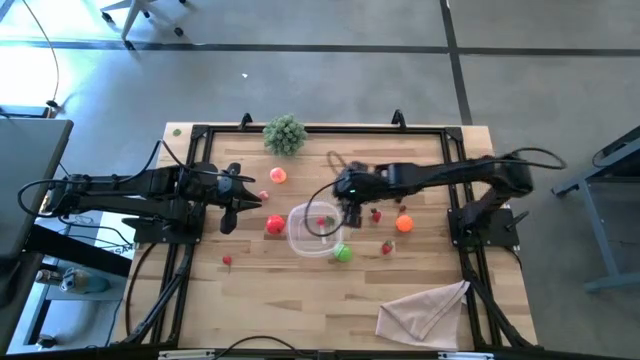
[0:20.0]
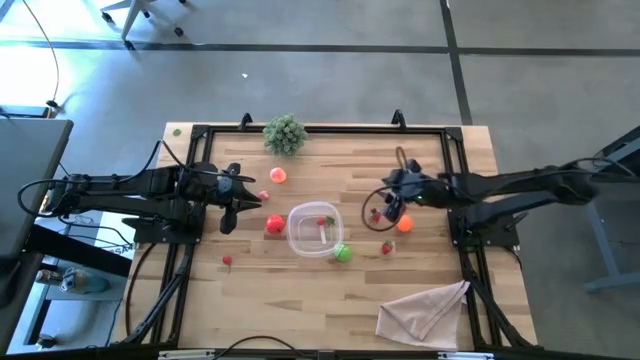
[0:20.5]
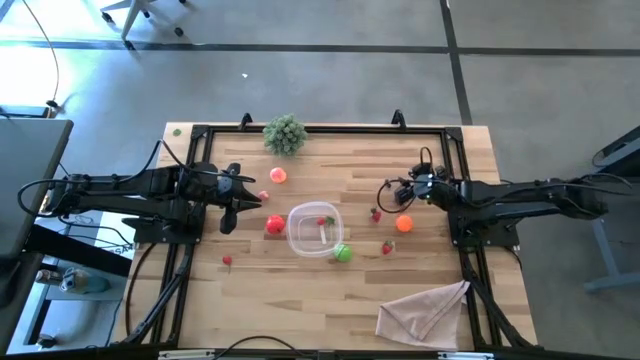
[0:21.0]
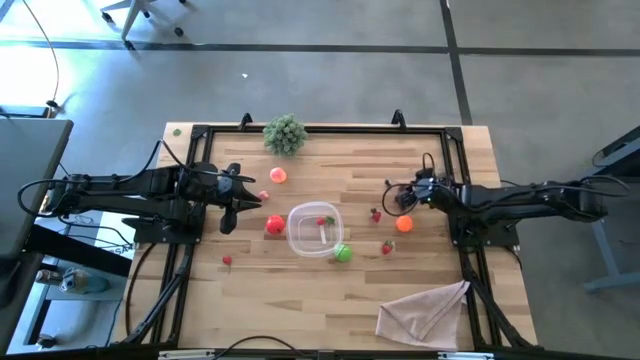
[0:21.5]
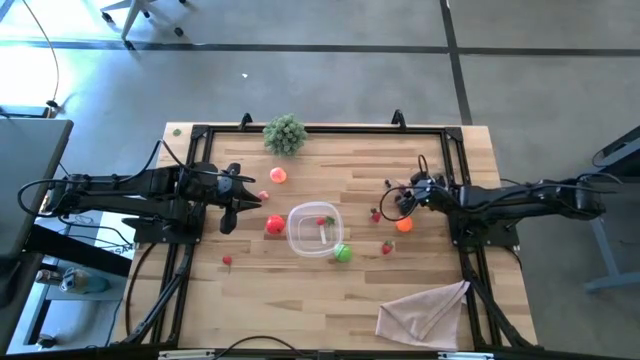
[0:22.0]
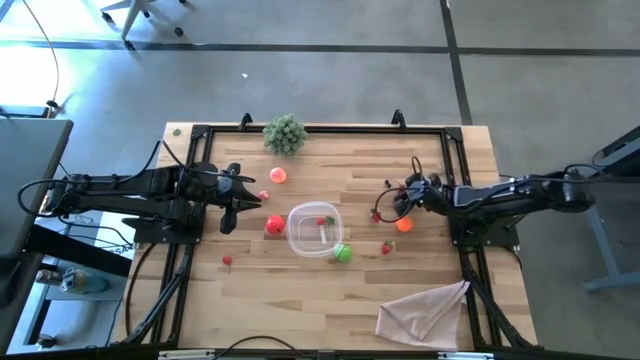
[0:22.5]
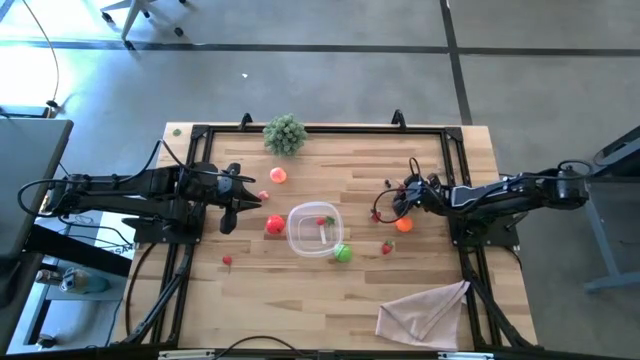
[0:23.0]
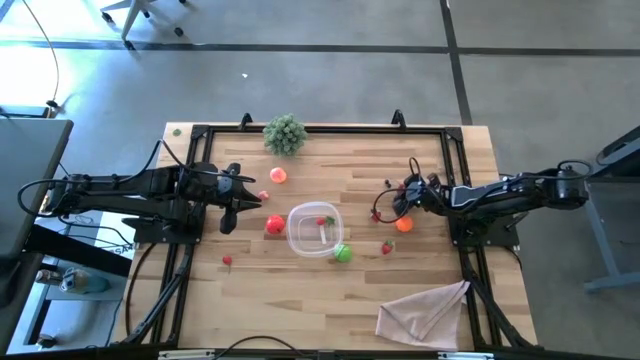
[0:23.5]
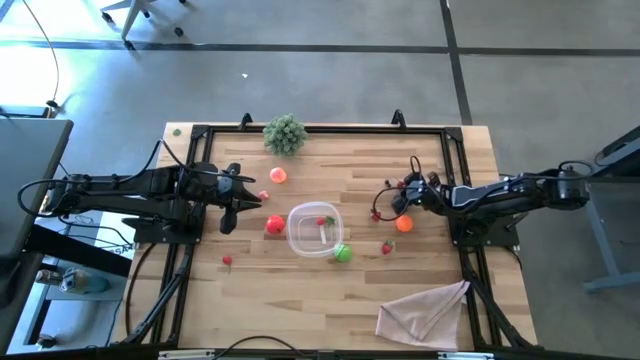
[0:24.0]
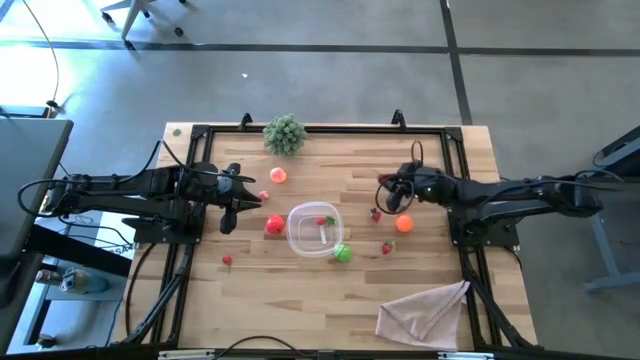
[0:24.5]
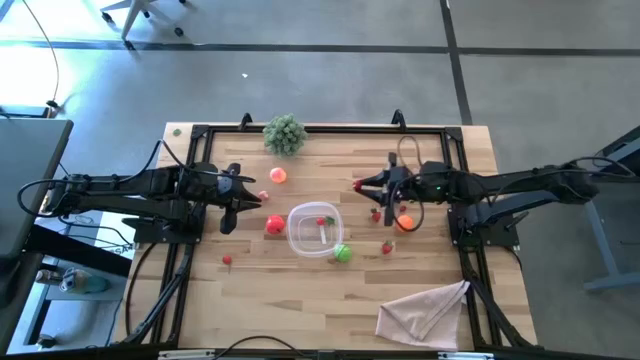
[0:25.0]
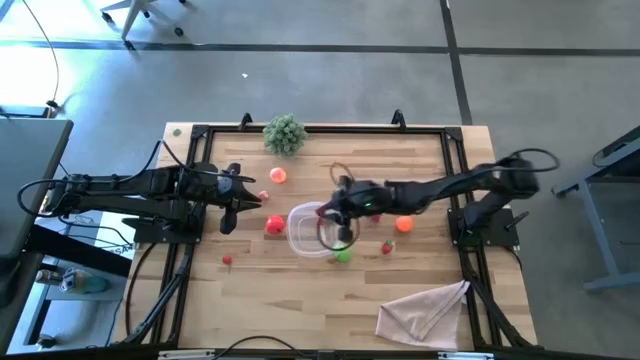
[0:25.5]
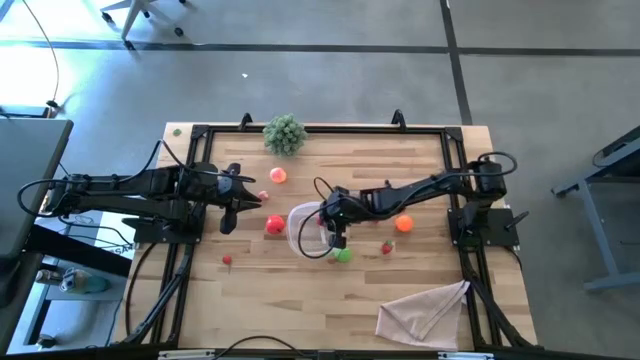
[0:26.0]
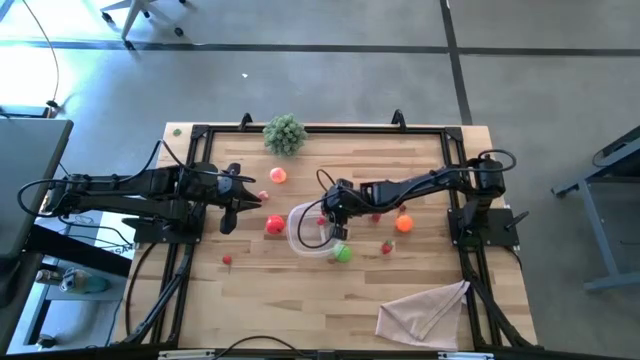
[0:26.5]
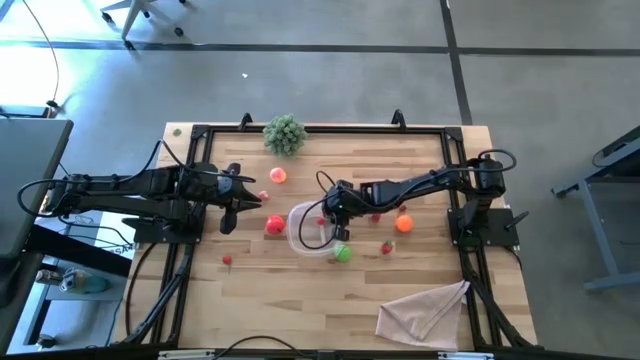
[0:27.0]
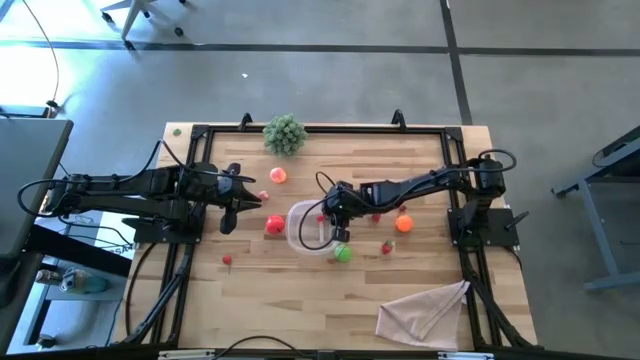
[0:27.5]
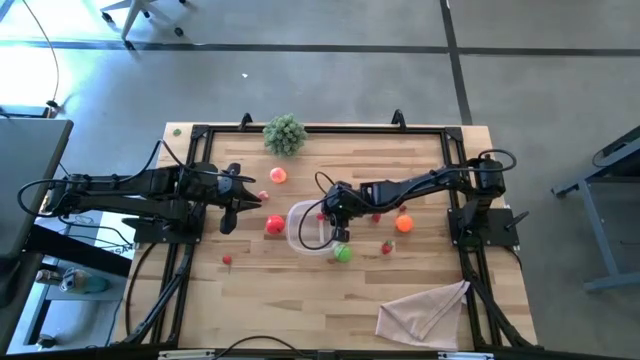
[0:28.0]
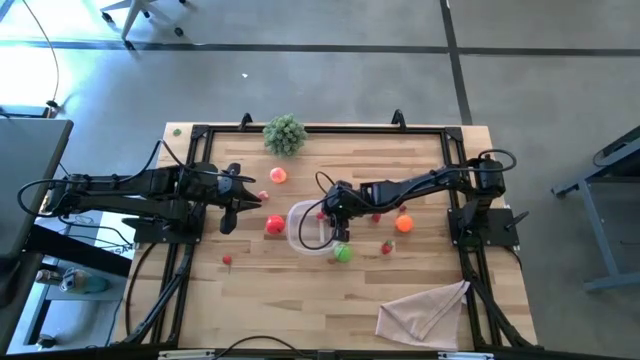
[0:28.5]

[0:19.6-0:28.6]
Task: Pick and placing Produce into tupperware
Put the right cherry into the transparent bin

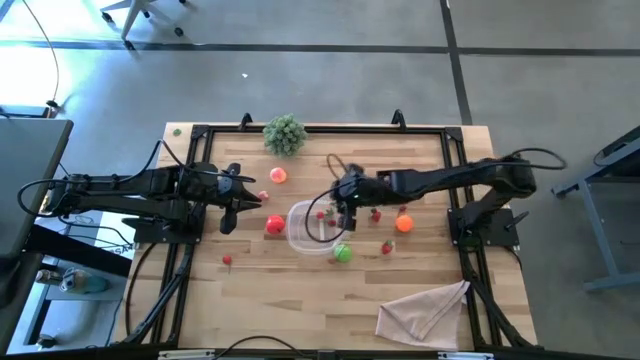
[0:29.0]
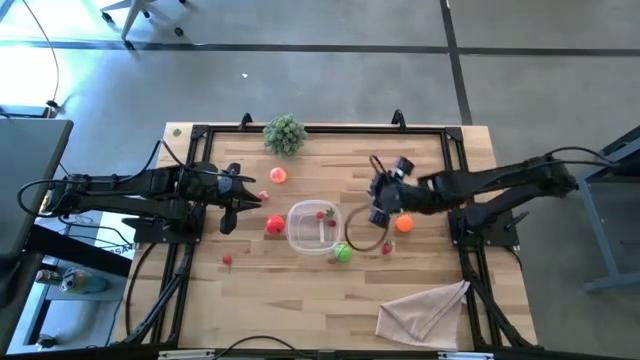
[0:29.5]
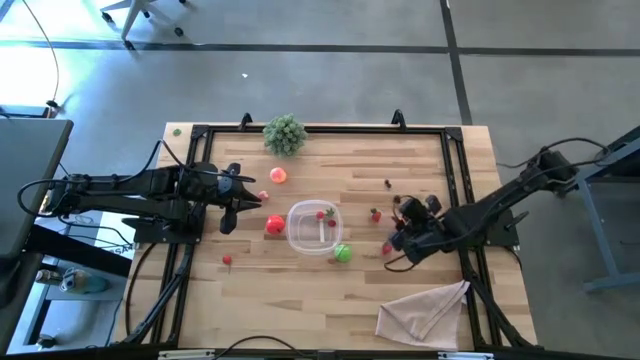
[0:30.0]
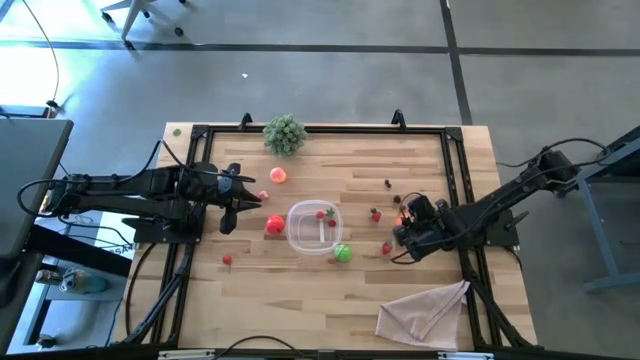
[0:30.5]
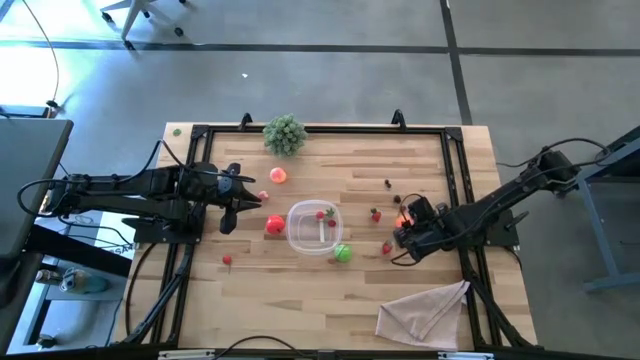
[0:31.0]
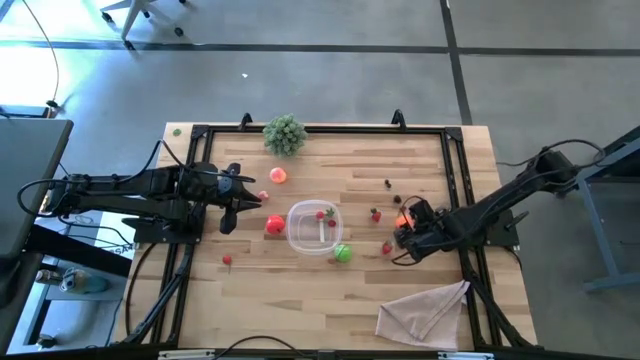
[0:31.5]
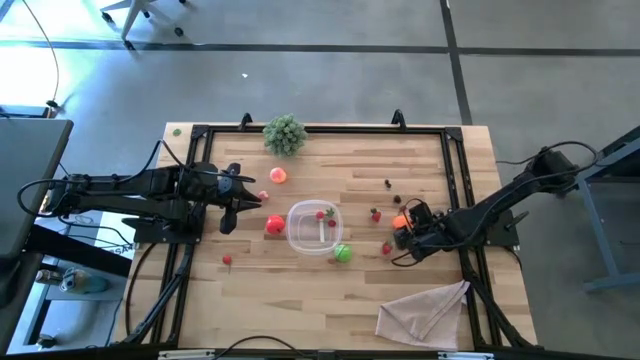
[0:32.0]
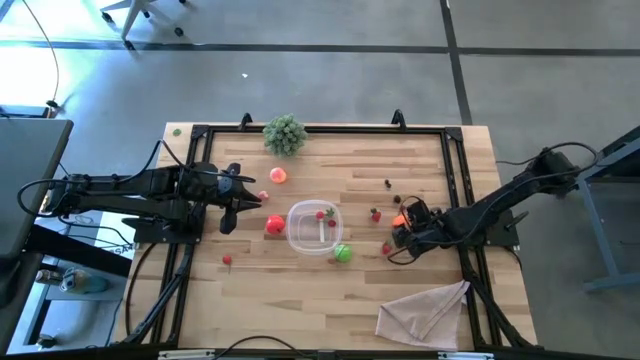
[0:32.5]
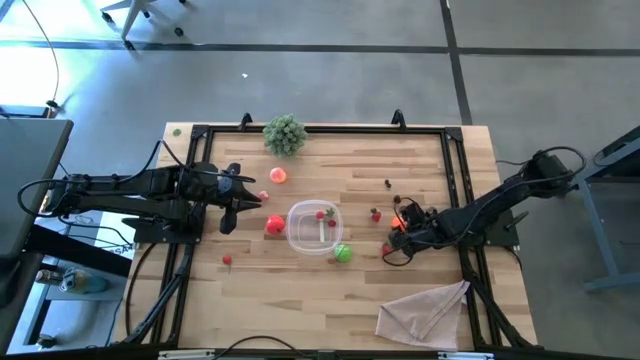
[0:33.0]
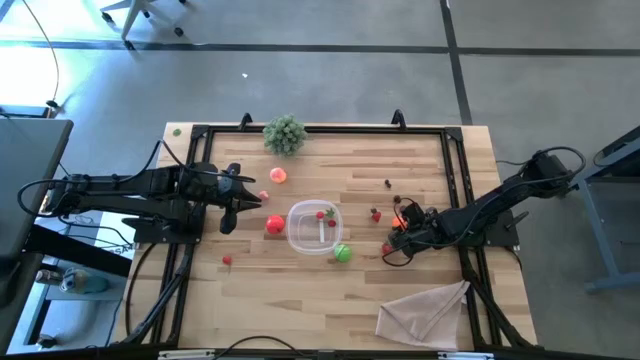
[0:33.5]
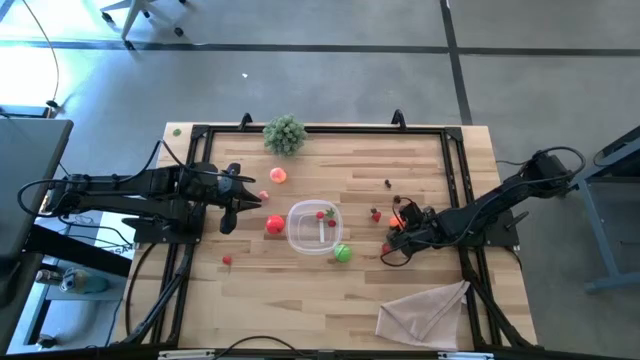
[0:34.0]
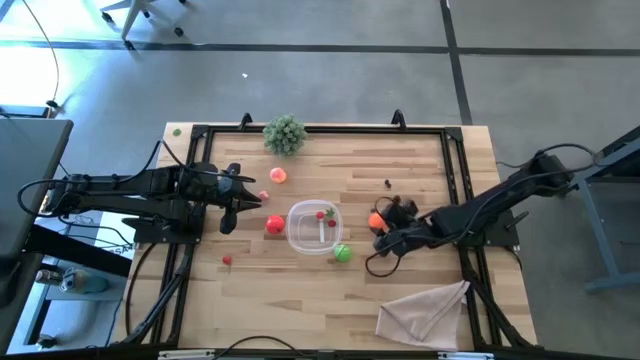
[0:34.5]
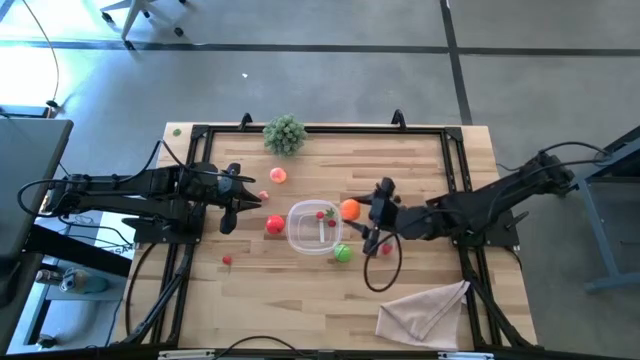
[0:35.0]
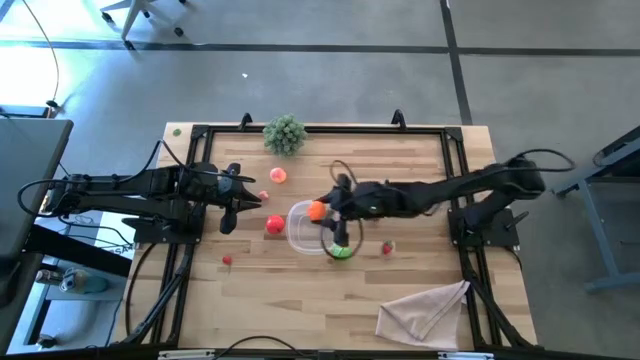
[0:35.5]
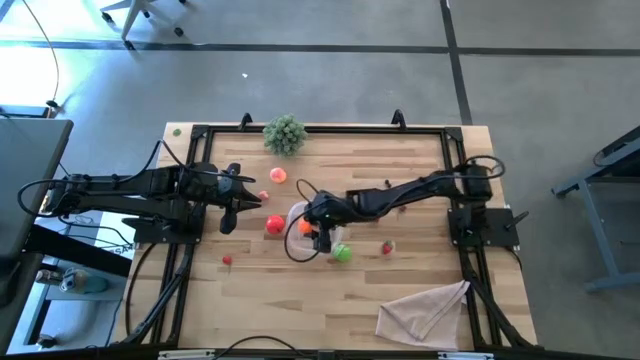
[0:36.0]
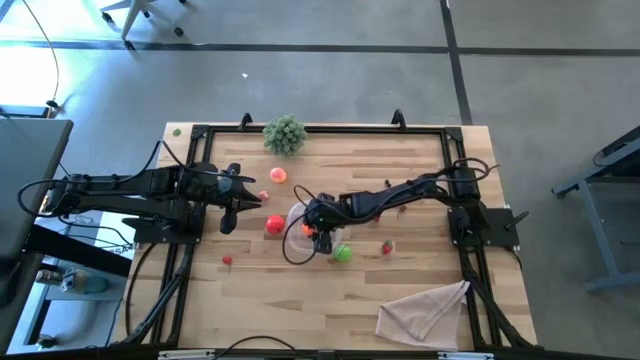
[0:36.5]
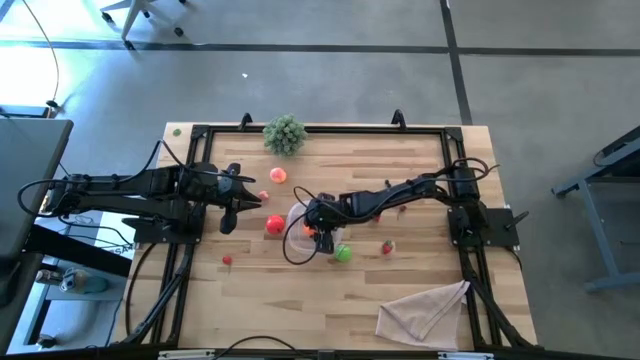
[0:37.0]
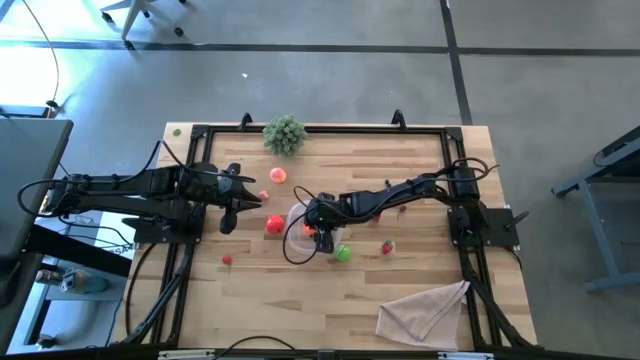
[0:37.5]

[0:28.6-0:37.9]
Put the tangerine into the transparent bin

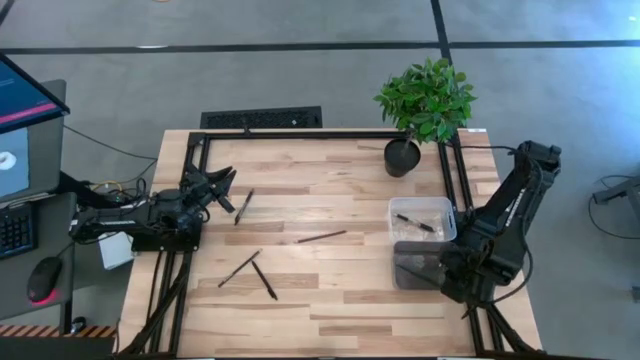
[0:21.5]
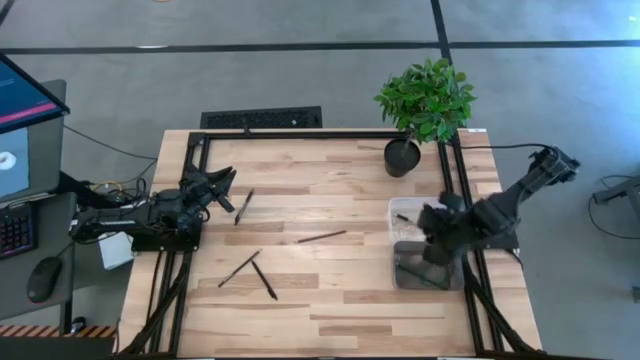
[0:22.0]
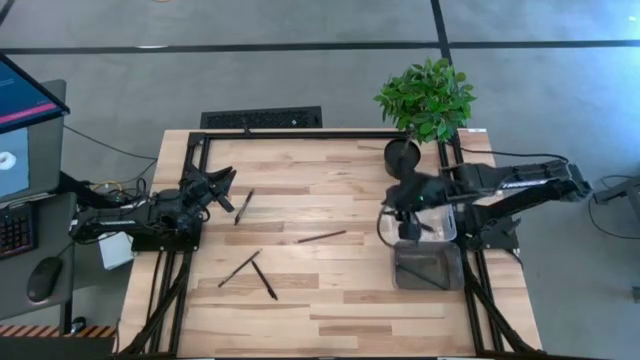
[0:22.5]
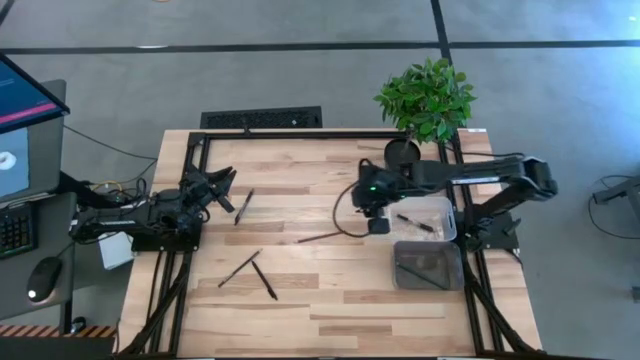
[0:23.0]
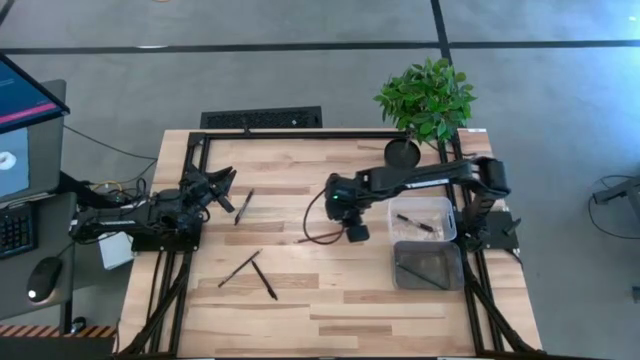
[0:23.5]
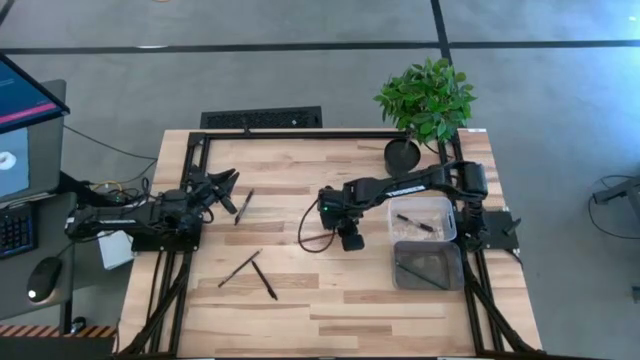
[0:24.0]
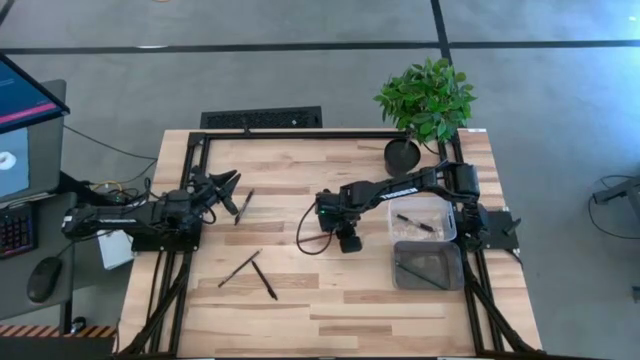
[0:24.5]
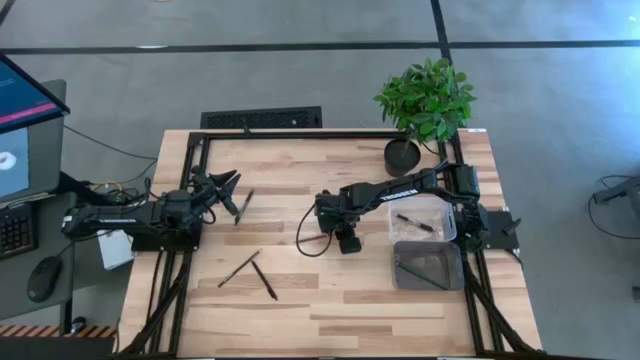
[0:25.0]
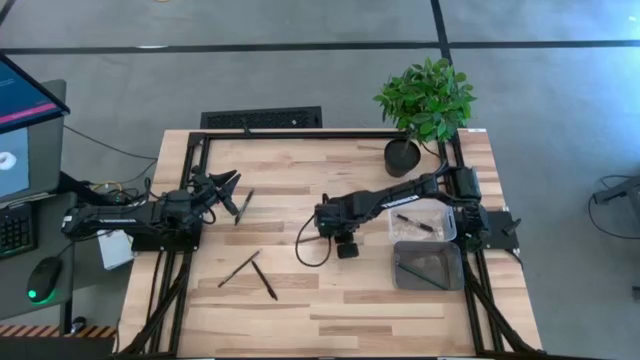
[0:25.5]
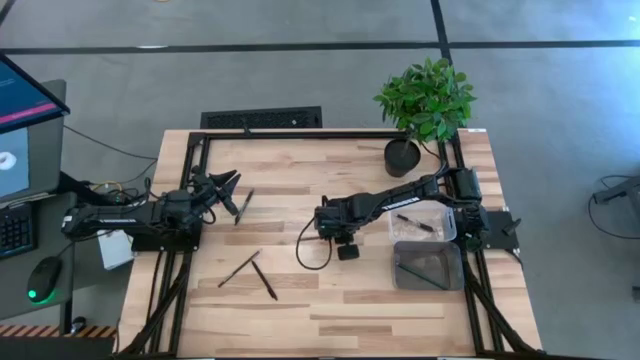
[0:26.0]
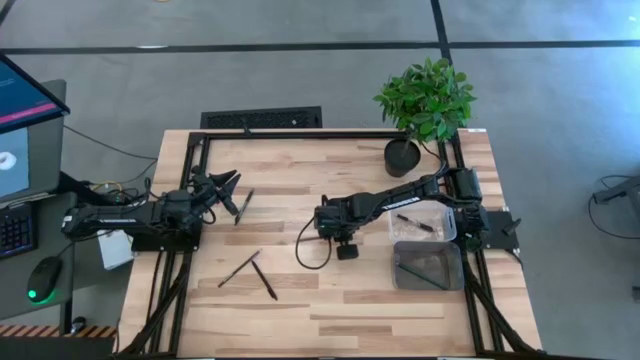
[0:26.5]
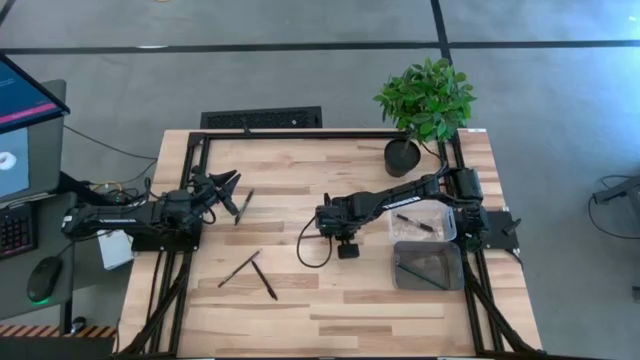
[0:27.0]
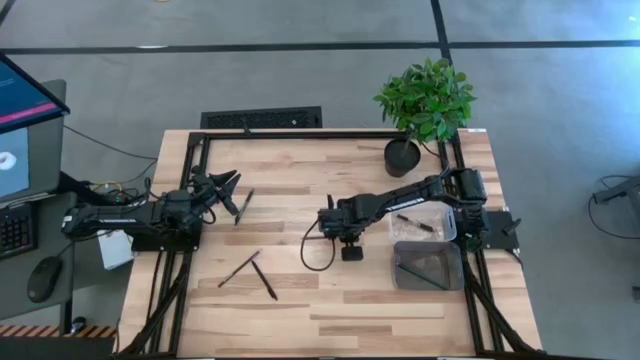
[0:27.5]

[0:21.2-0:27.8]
Task: Sort pens & pencils
Put the brown pencil into the black transparent bin
